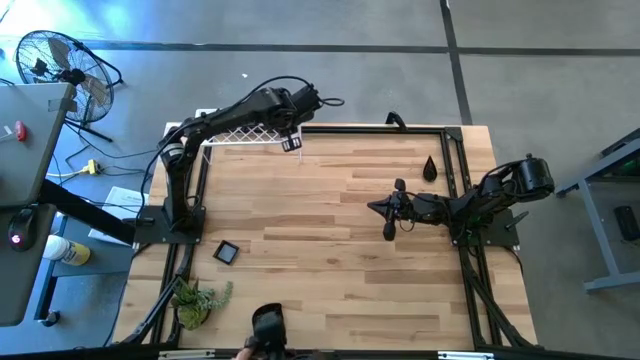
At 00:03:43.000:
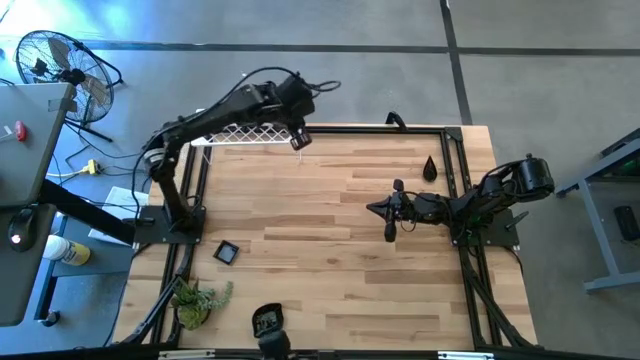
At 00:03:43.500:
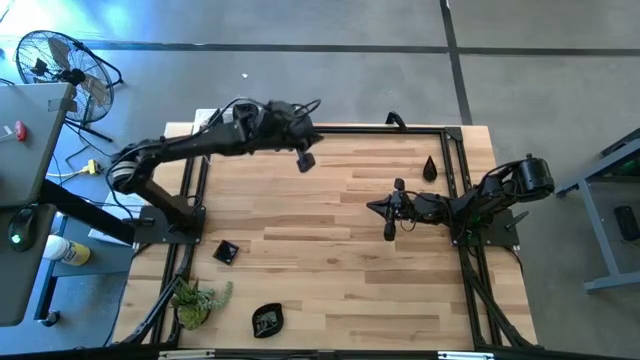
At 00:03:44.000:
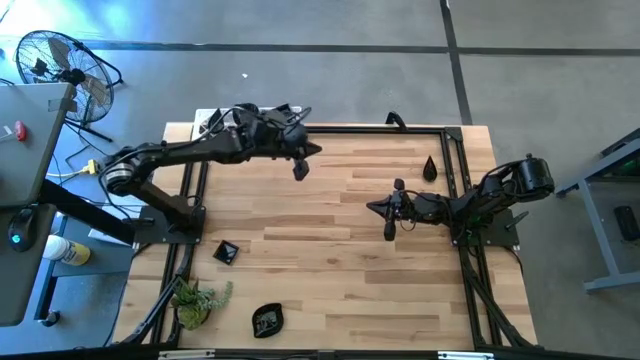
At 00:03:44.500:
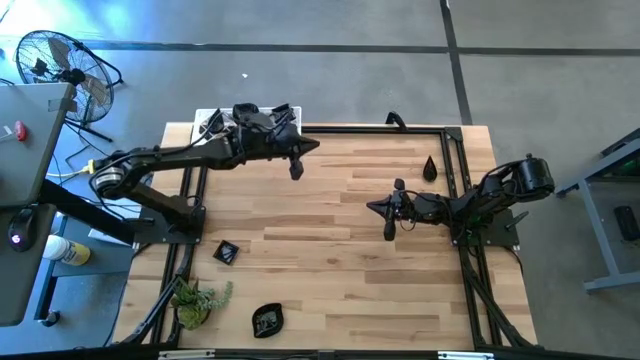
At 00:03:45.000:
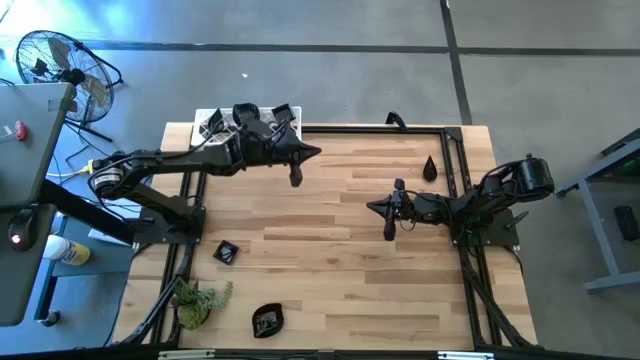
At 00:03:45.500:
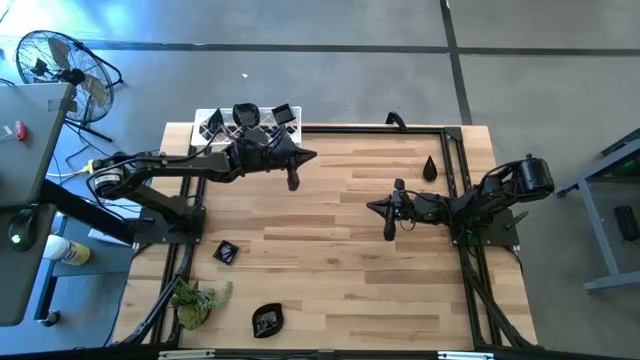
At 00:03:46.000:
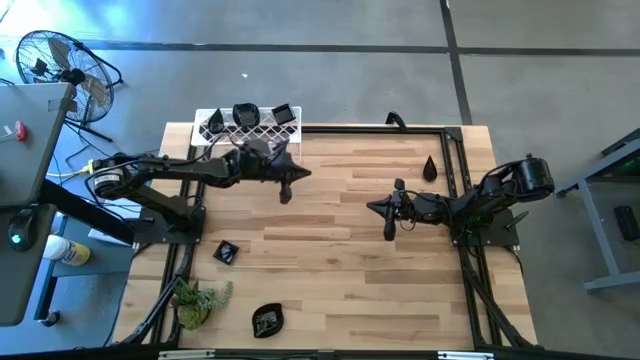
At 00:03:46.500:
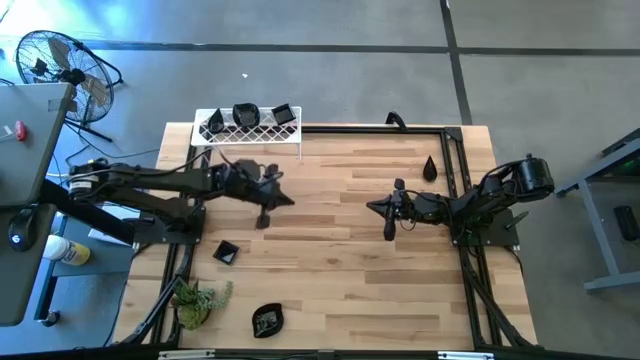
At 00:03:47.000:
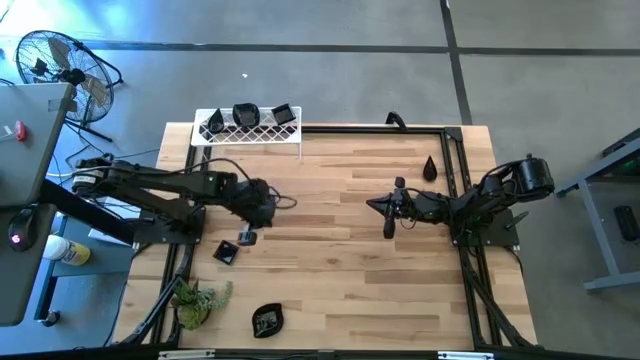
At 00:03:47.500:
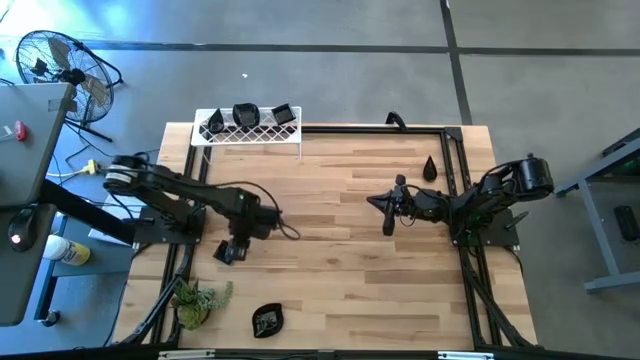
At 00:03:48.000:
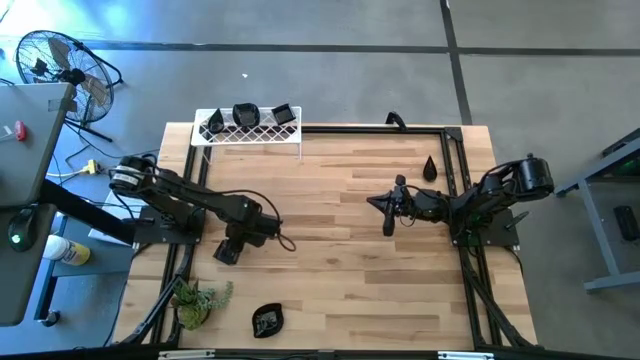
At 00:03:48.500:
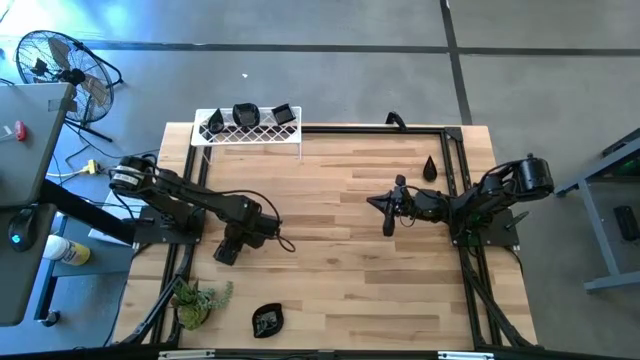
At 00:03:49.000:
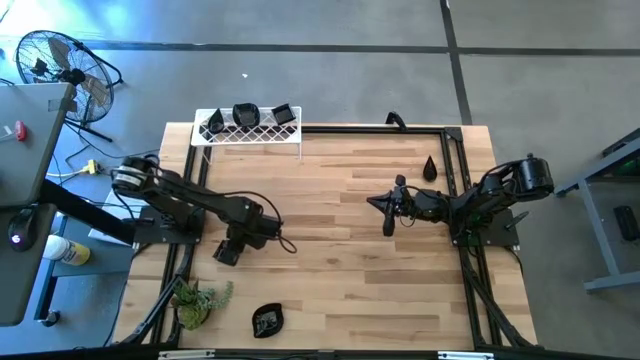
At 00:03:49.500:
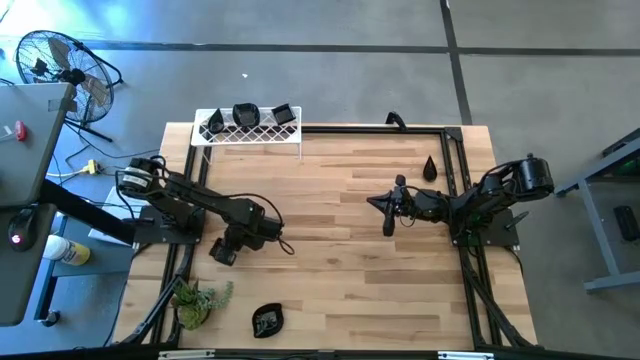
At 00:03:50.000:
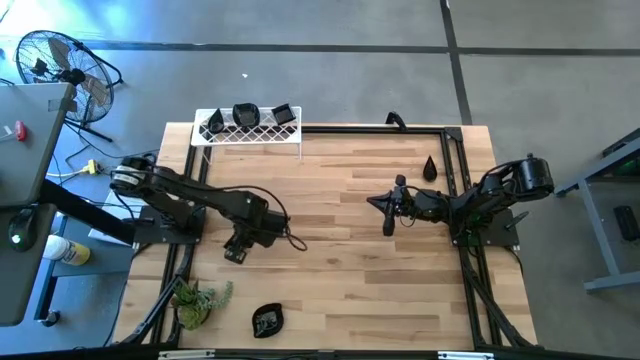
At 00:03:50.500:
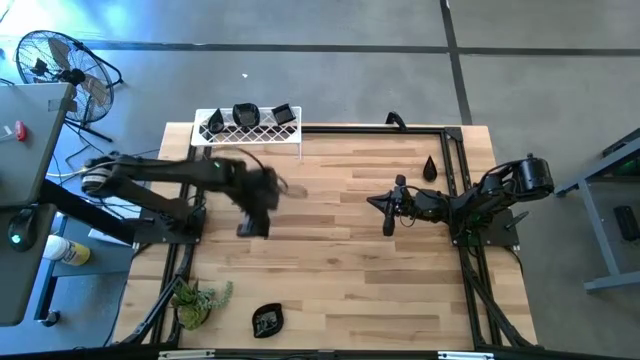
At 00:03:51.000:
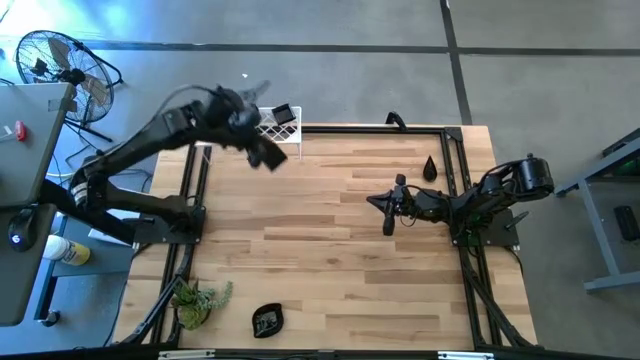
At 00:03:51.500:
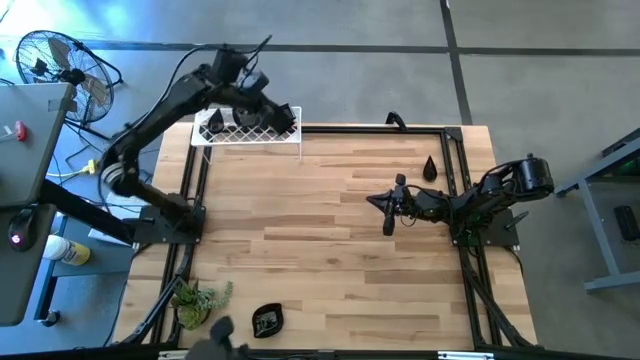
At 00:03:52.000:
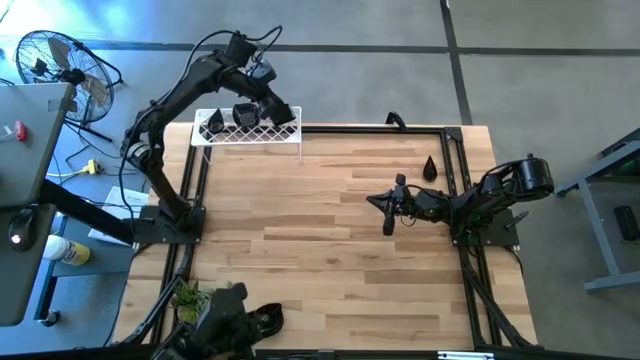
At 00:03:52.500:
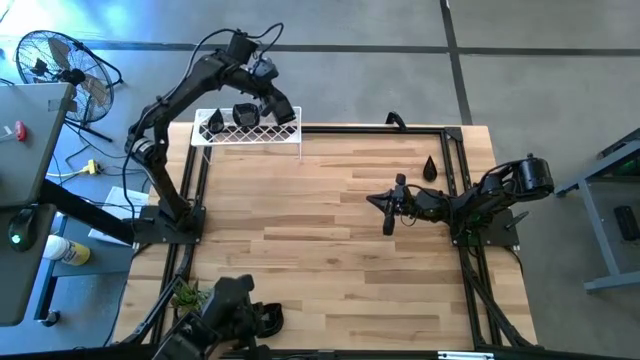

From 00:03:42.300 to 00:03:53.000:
Task: Pick & Place Mini shaped plates
Stack the square plate on top of the square plates on the shelf

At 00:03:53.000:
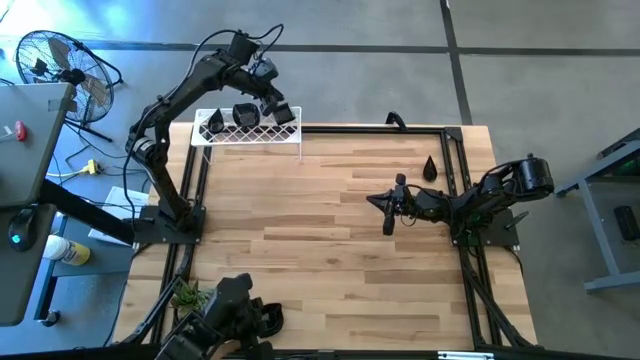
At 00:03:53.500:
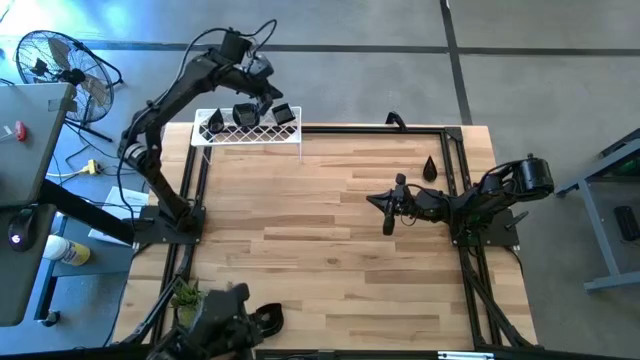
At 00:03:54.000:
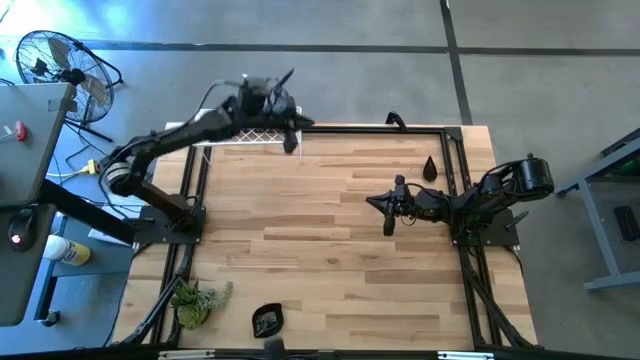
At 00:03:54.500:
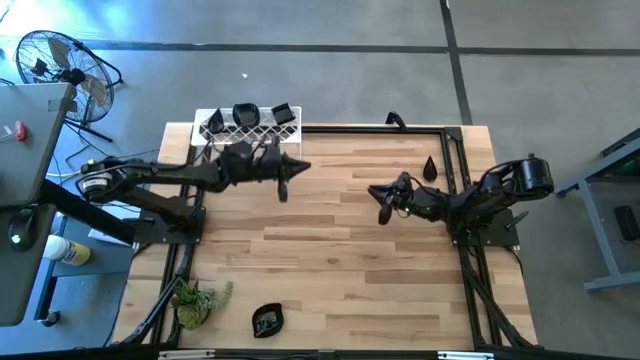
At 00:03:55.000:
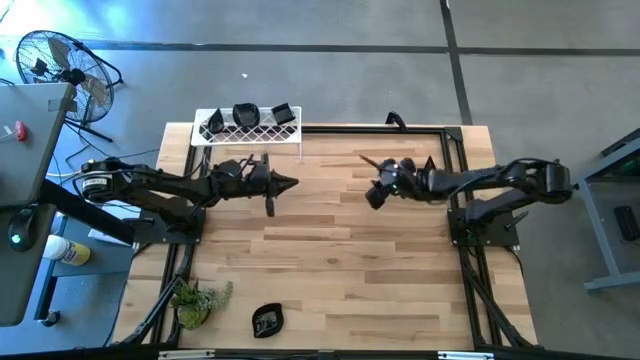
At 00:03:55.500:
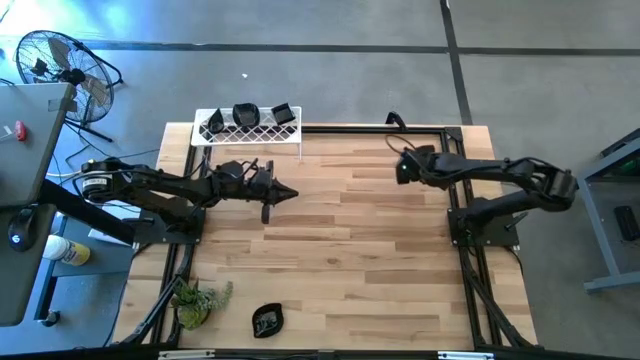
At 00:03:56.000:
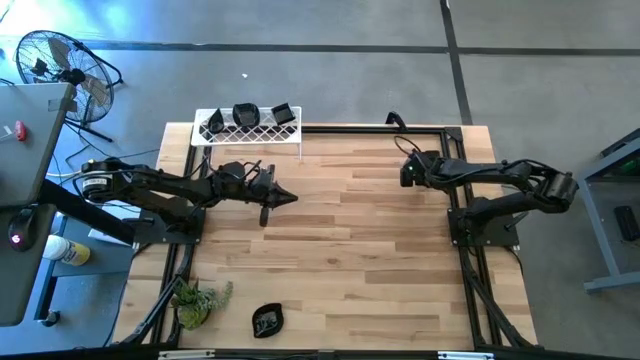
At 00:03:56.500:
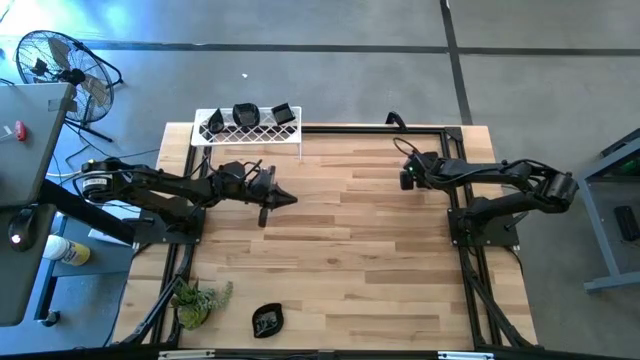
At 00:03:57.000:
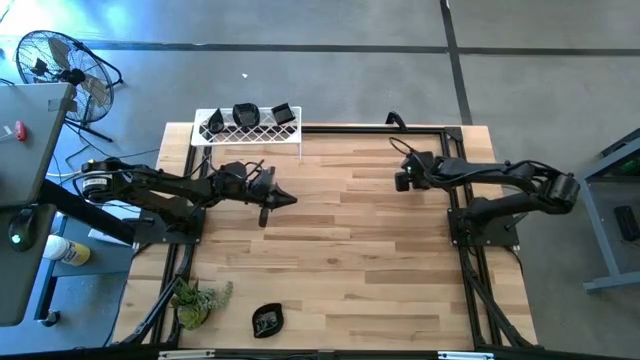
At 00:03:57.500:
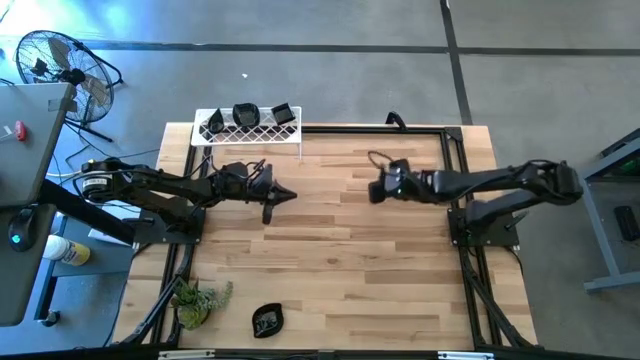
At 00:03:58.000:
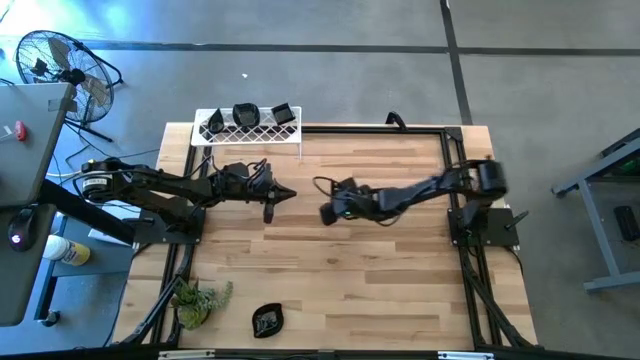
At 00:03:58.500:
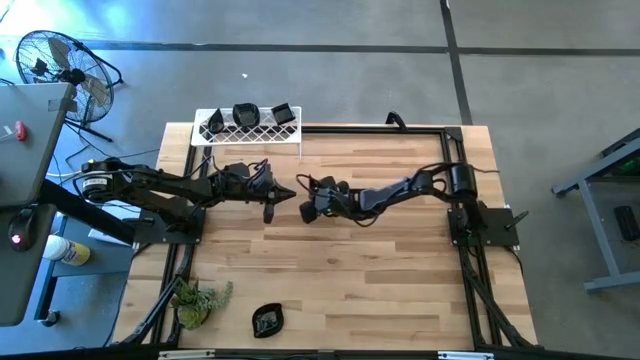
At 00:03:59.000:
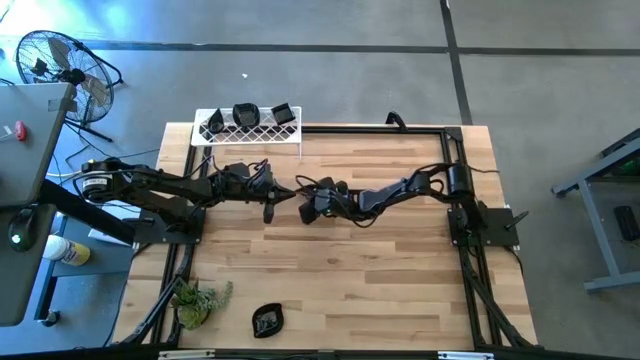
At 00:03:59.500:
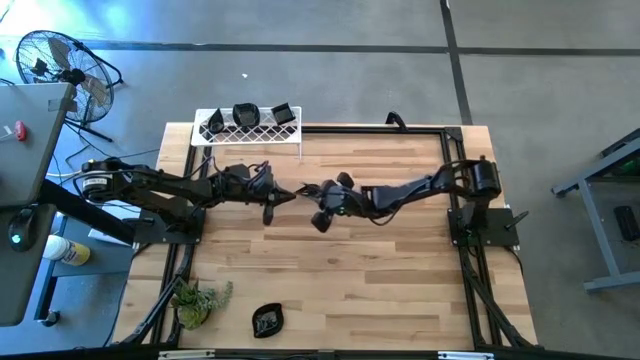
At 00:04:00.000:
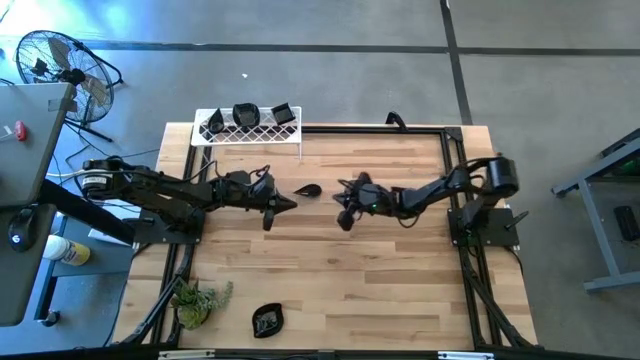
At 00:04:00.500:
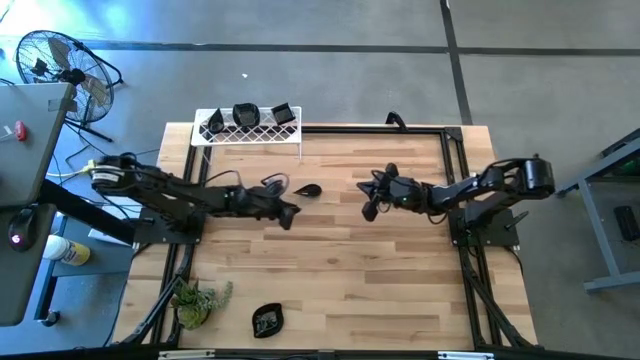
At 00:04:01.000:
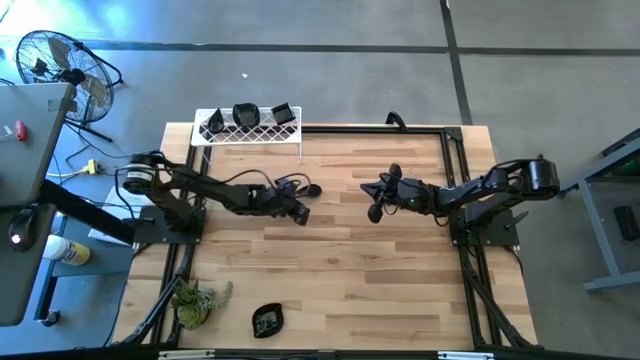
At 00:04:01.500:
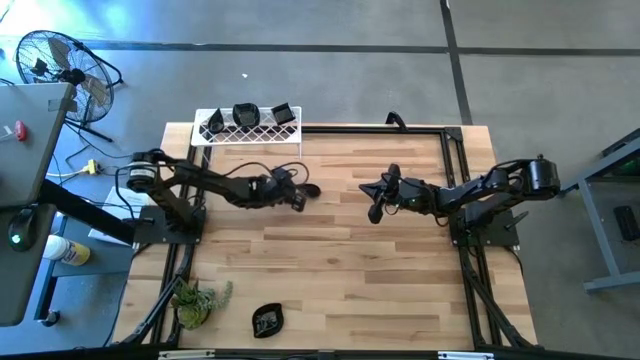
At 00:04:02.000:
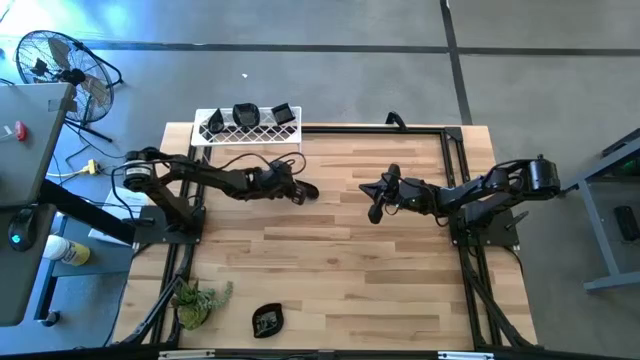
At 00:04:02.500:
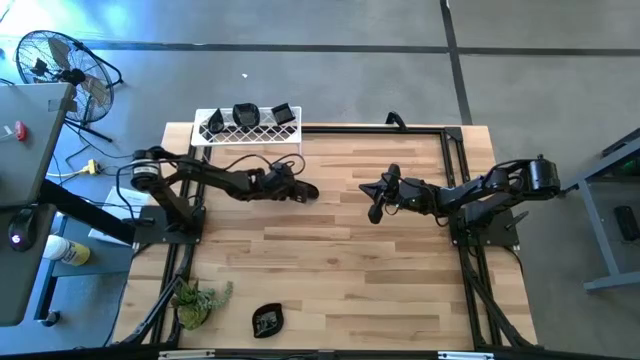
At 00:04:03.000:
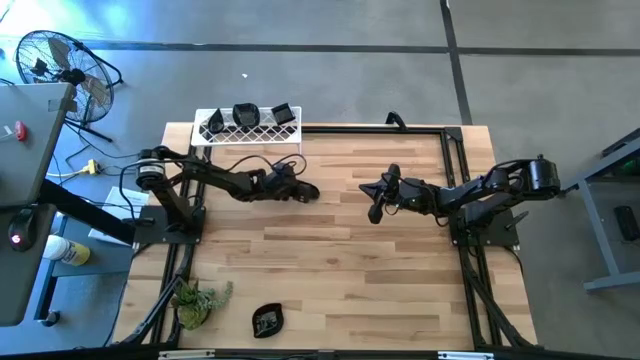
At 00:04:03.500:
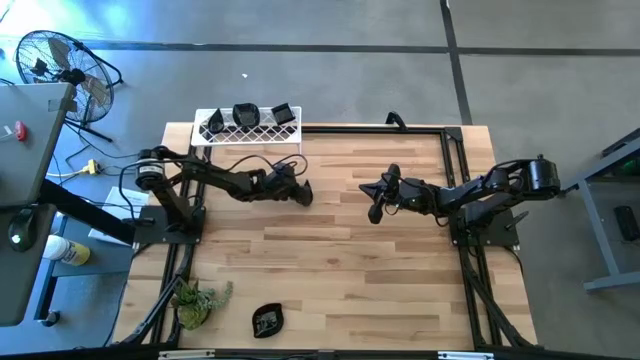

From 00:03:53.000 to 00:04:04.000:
Stack the drop-shaped plate on top of the drop-shaped plates on the shelf
